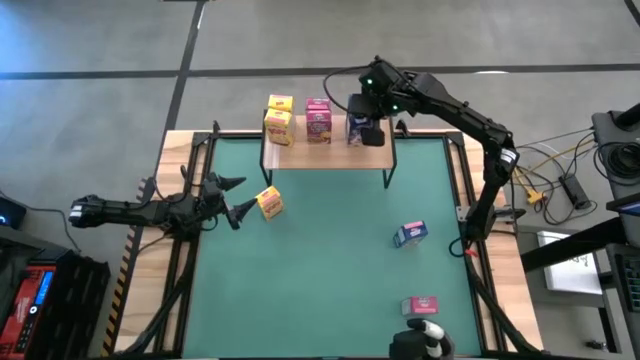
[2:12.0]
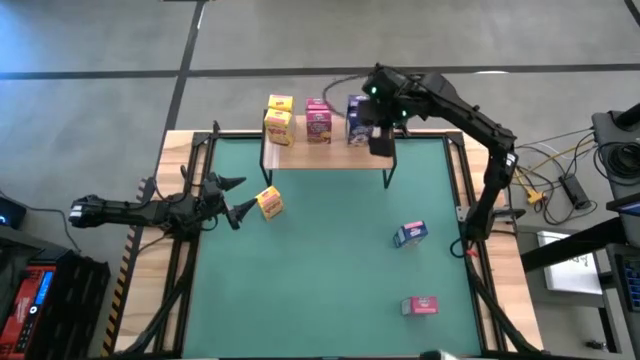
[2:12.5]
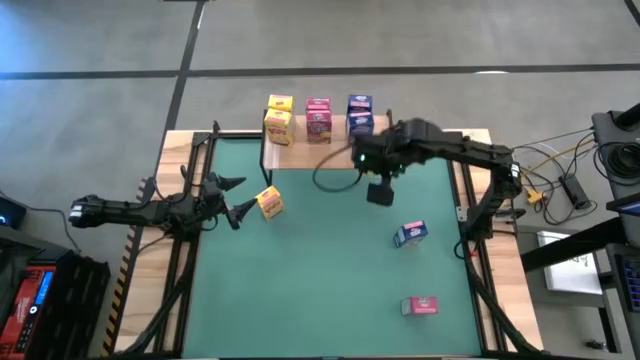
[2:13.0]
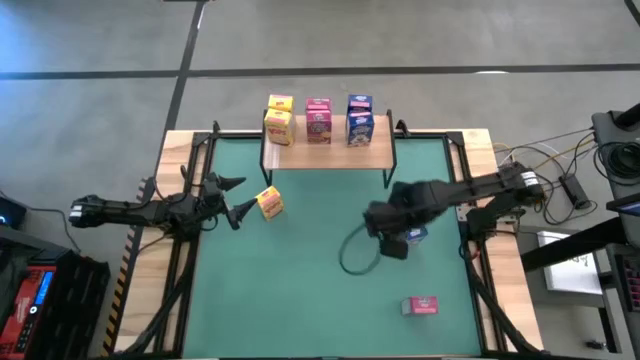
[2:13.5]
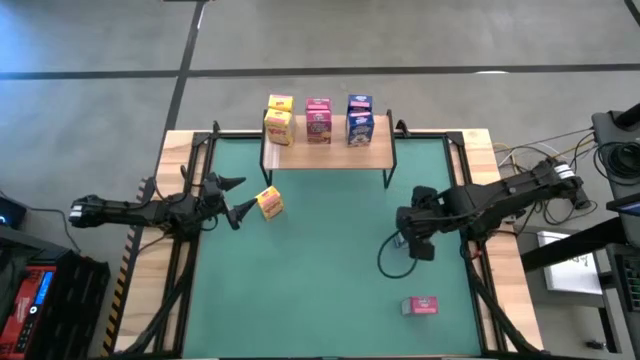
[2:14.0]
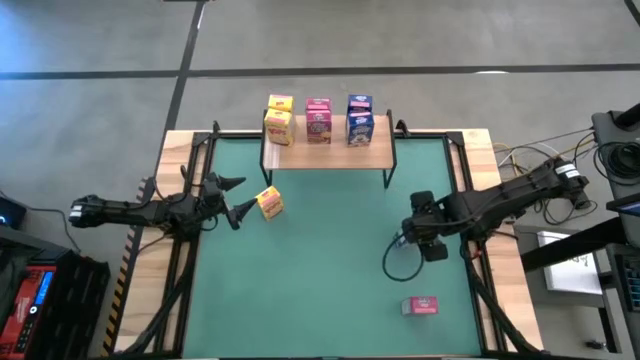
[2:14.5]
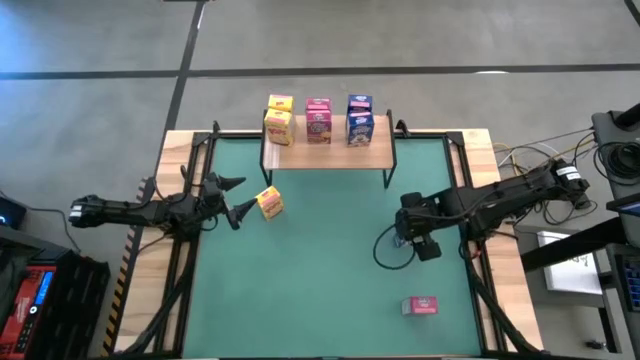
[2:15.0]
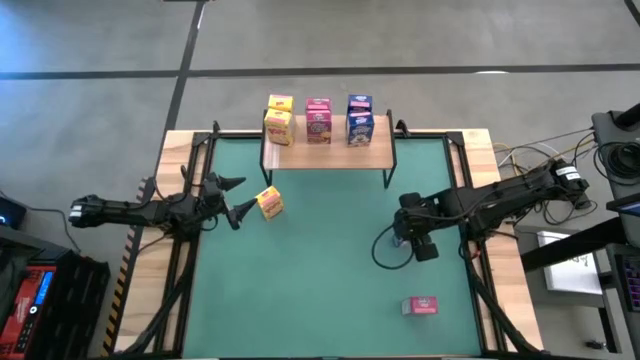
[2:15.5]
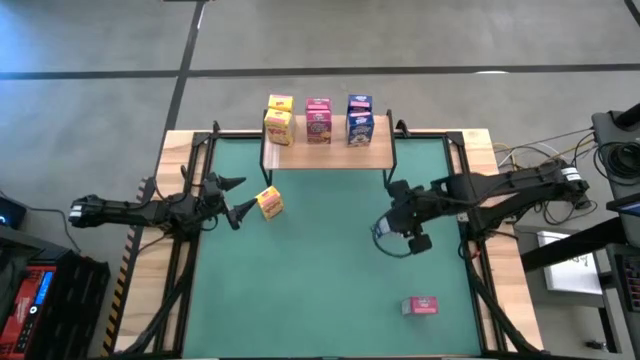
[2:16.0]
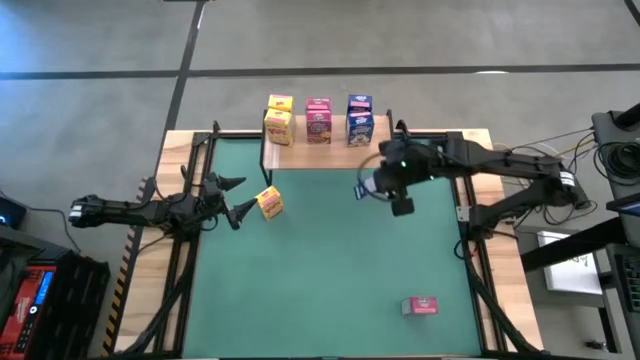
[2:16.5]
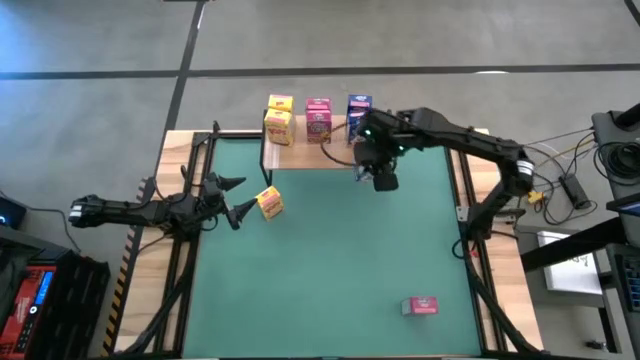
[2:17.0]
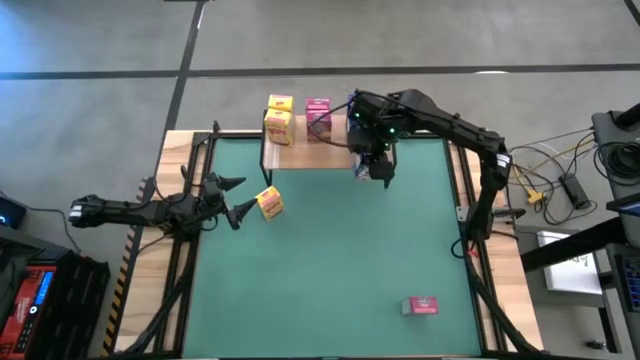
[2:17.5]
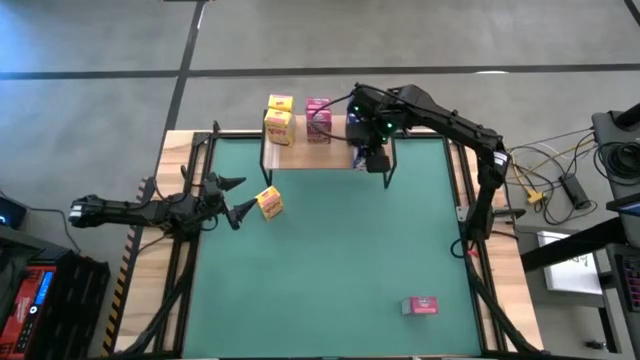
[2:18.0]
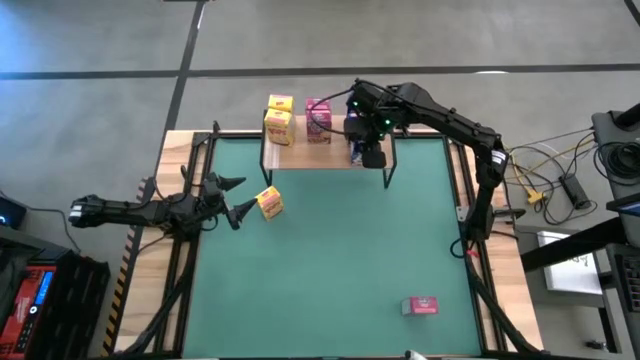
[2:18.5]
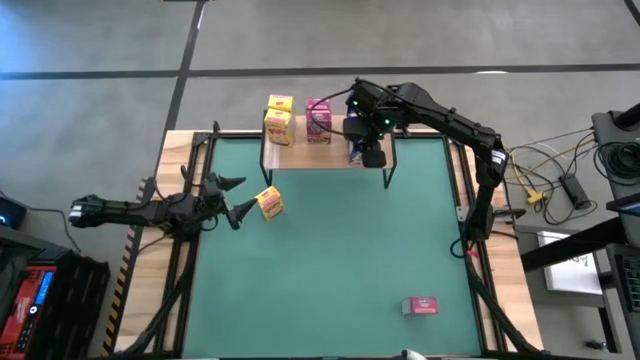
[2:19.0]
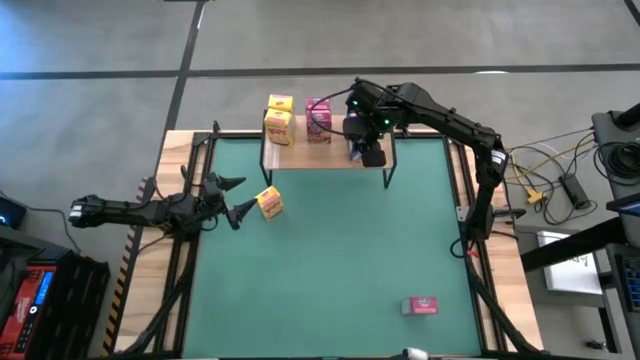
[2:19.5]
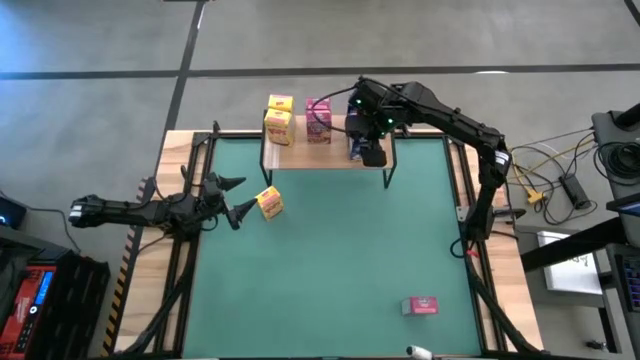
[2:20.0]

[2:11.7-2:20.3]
Task: Stack cereal on shelf
Put the blue cereal box on the shelf

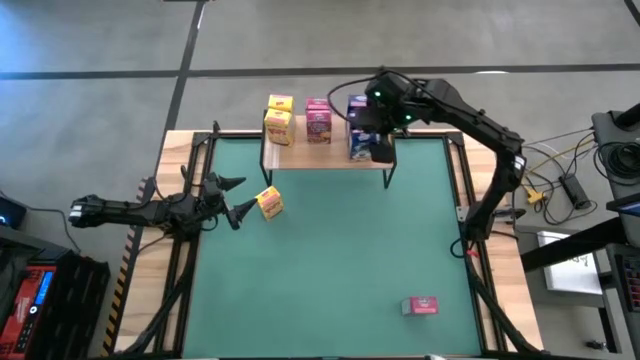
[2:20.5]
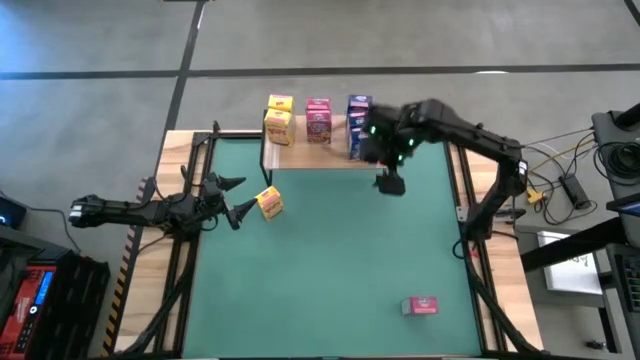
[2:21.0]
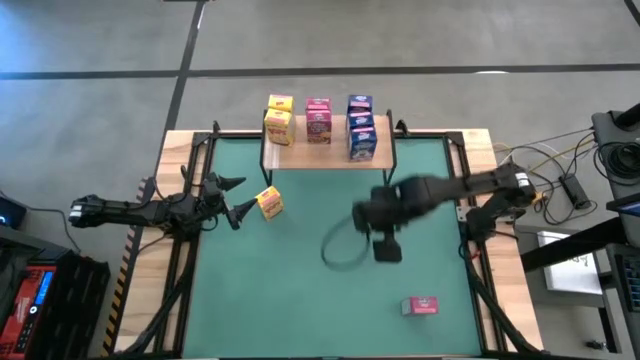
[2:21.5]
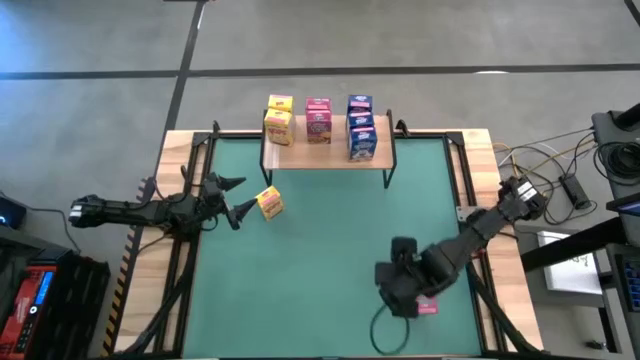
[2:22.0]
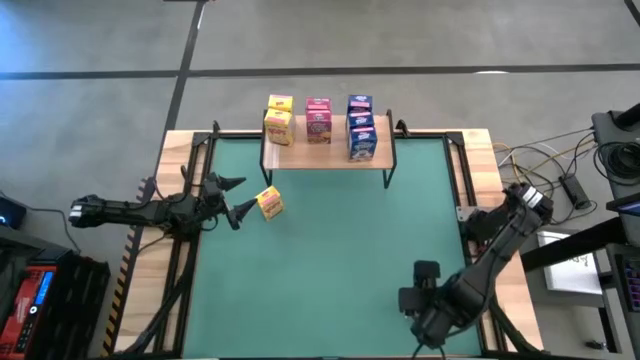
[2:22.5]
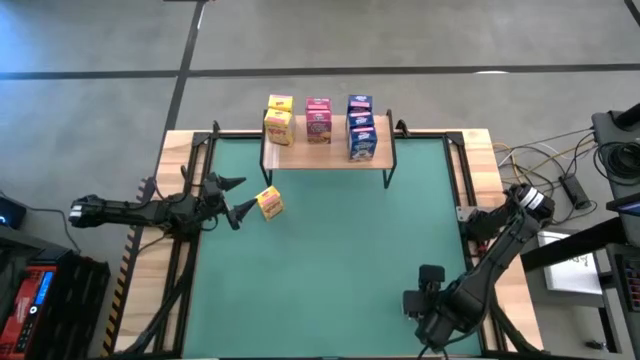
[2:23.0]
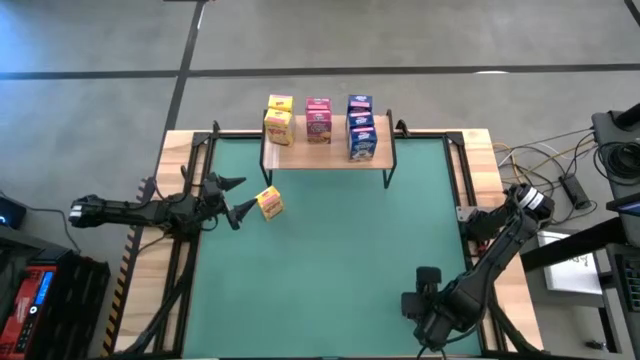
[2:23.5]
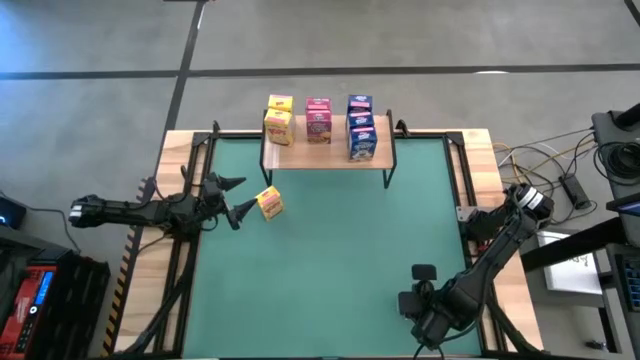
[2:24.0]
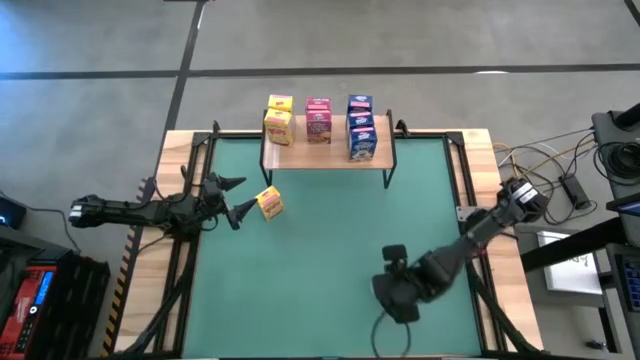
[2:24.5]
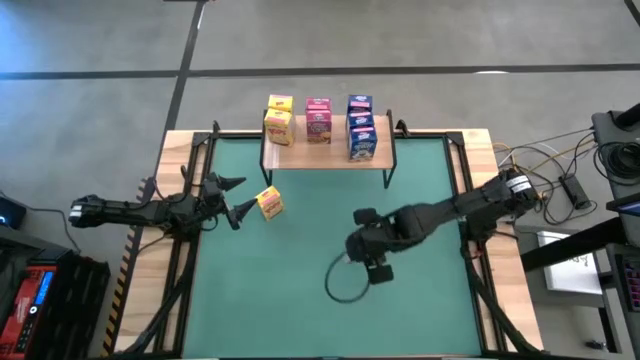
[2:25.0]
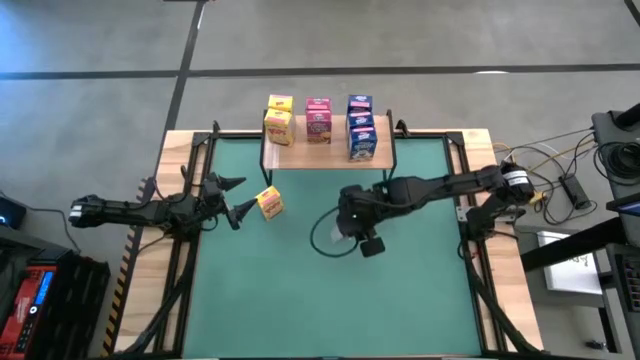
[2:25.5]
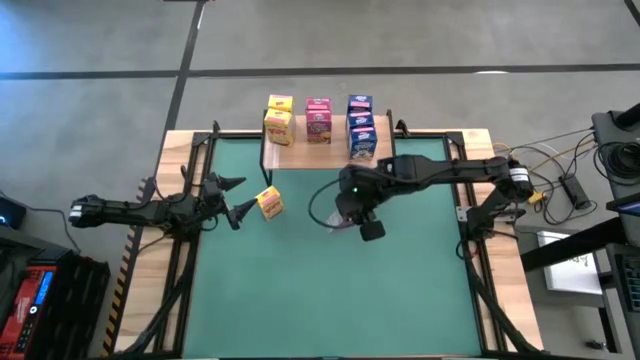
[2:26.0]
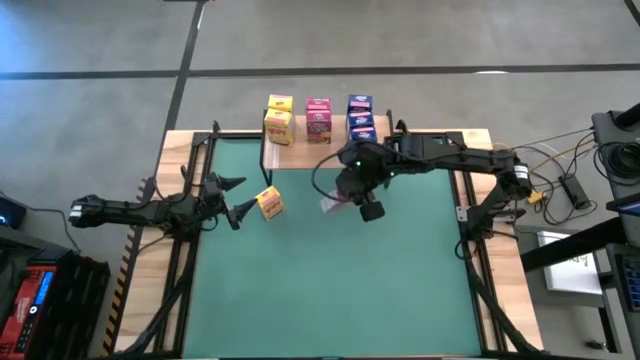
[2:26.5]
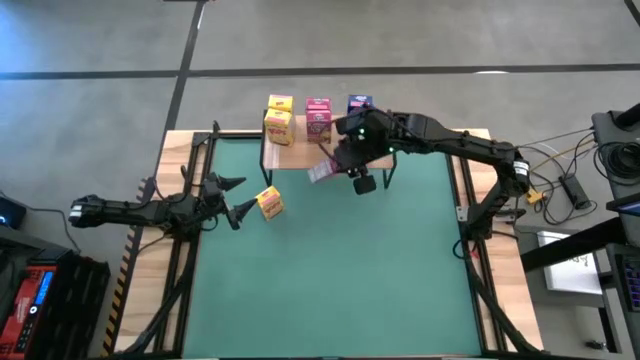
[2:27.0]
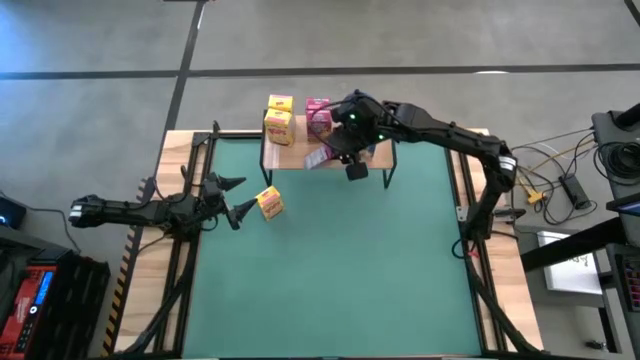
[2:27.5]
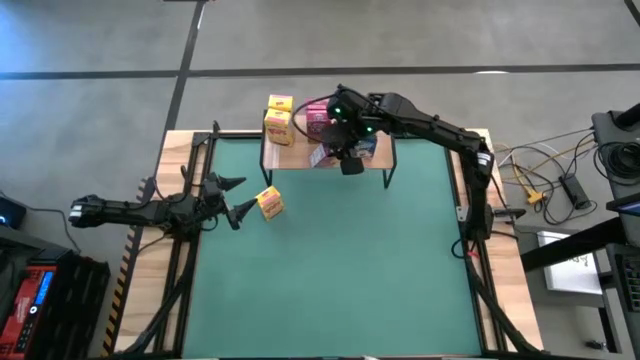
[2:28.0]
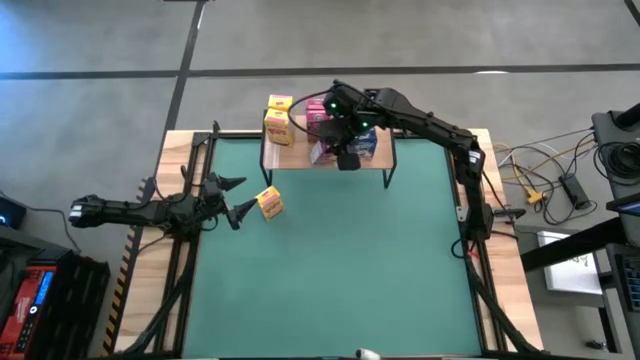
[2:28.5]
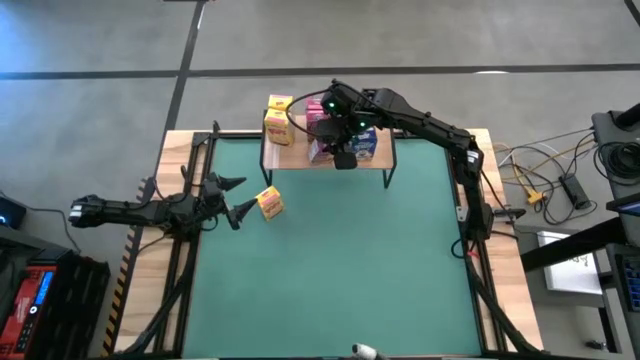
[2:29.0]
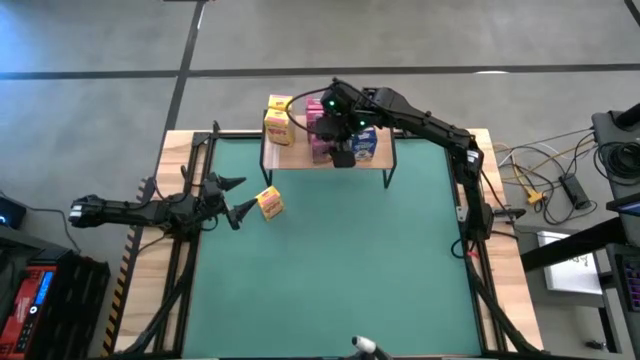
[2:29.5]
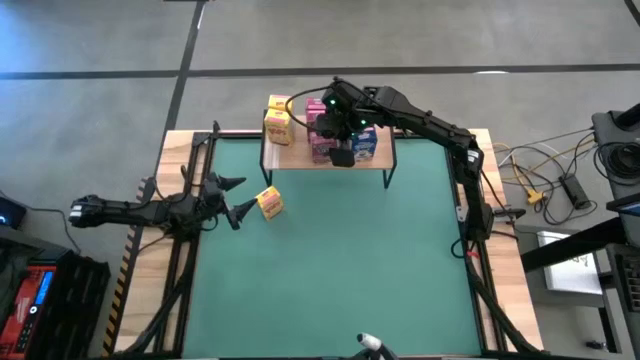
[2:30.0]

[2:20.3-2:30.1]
Put the purple cereal box on the shelf

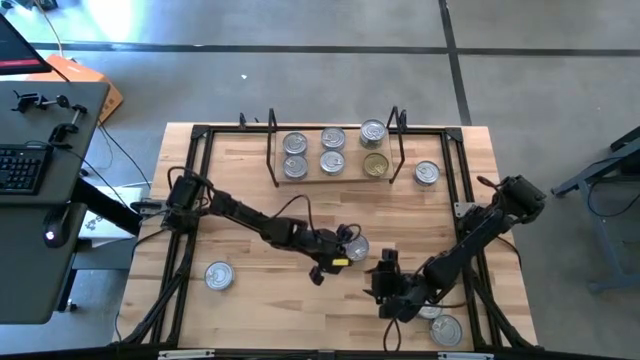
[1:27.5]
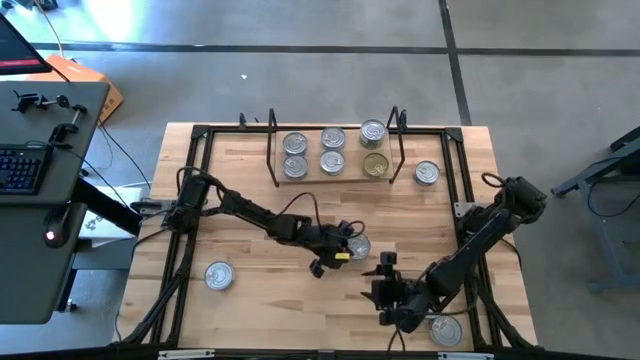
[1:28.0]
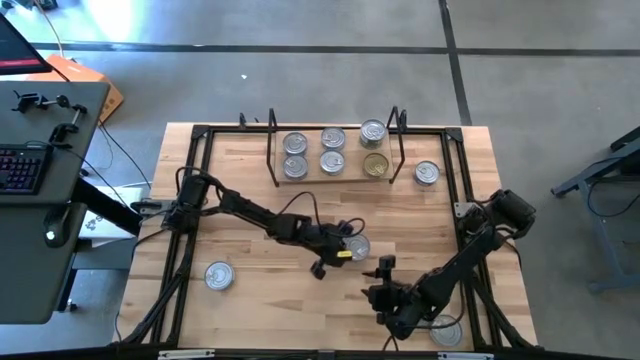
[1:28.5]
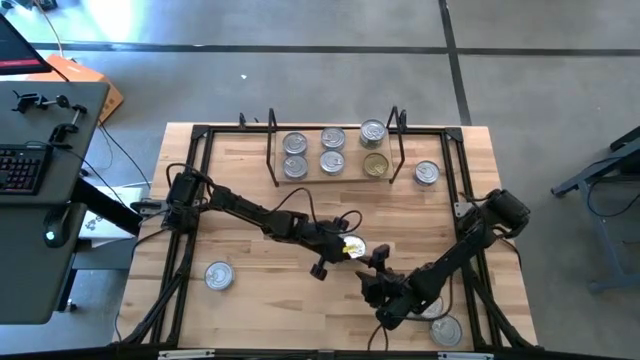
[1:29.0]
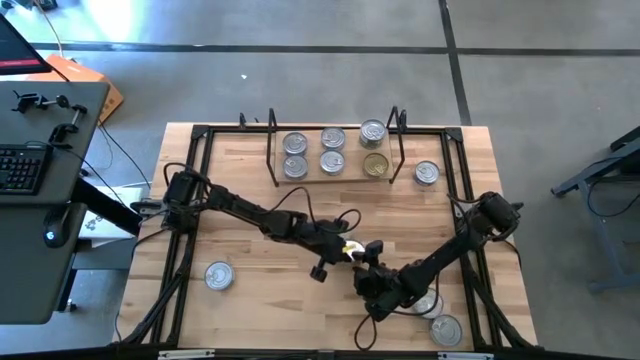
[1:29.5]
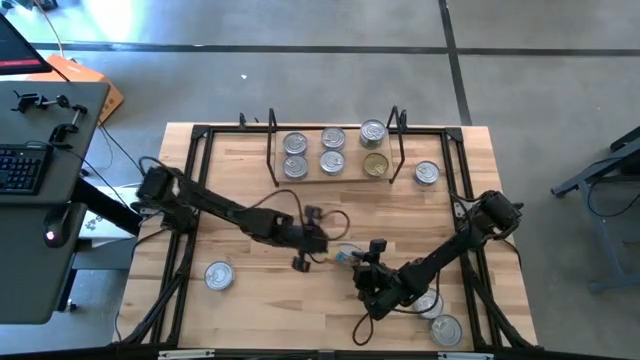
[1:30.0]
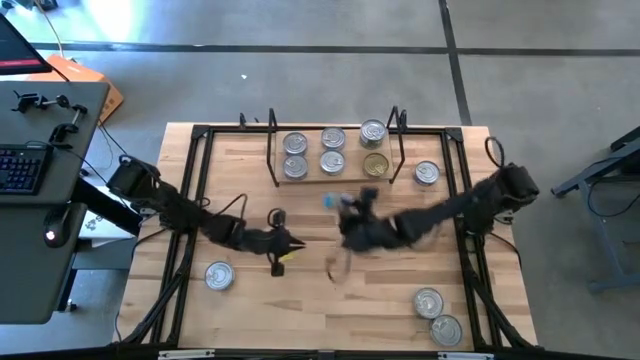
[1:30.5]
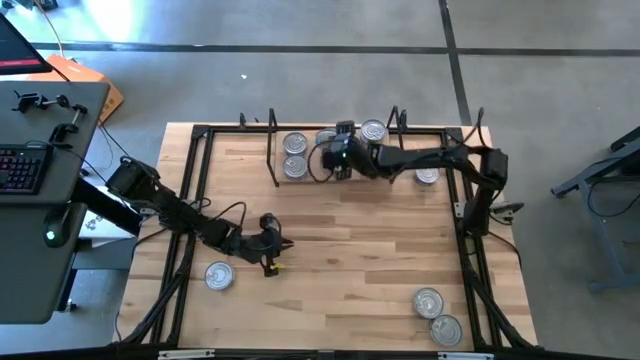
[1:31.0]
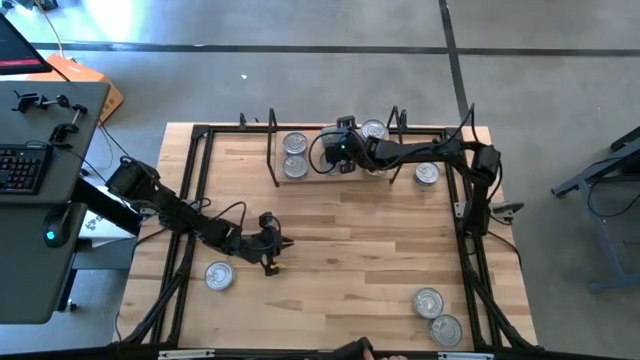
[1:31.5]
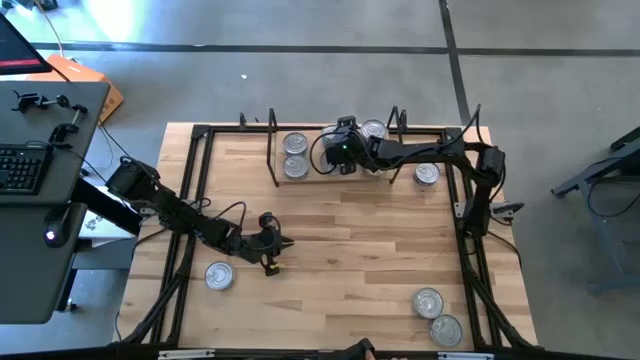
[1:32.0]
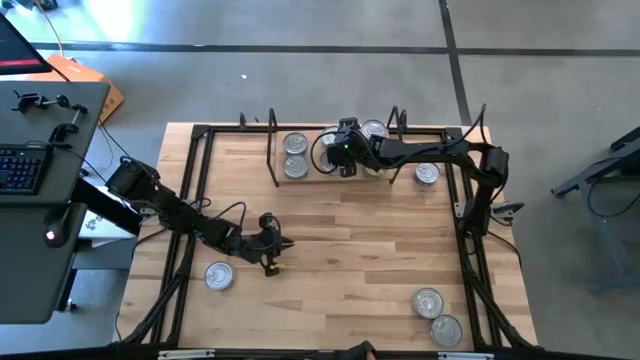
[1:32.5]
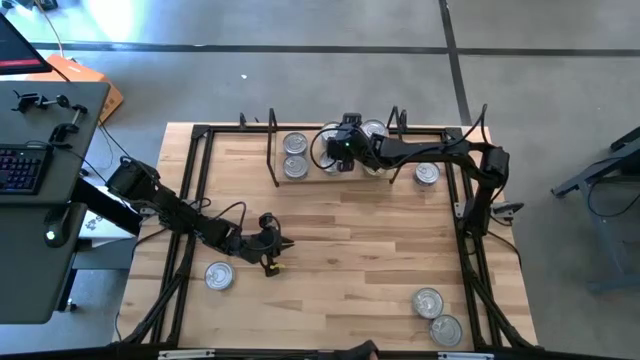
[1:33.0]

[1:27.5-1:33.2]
Task: Stack canned seafood by type on shelf
Stack the light blue tuna can on top of the light blue tuna can on the shelf
